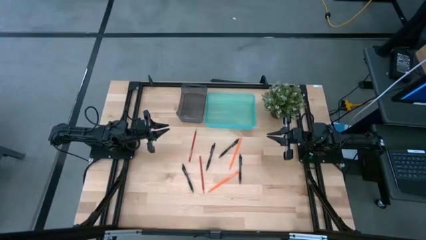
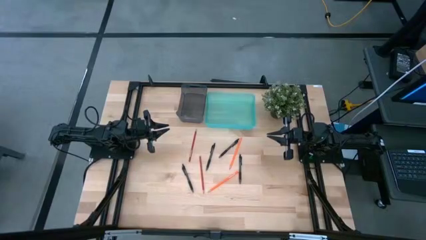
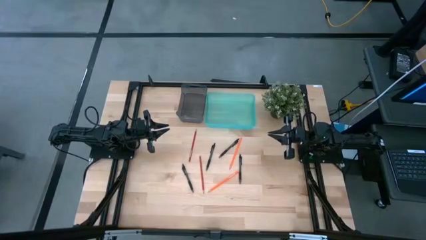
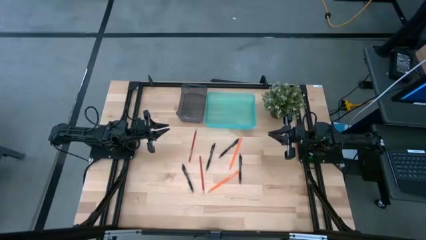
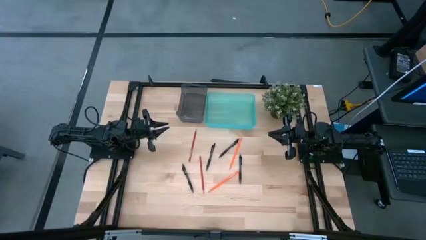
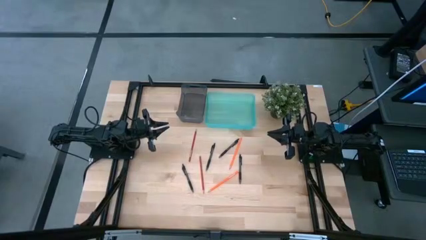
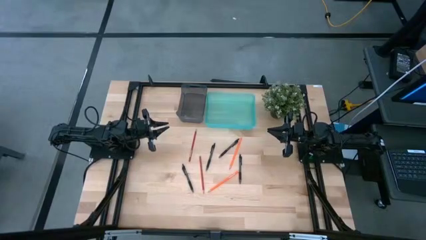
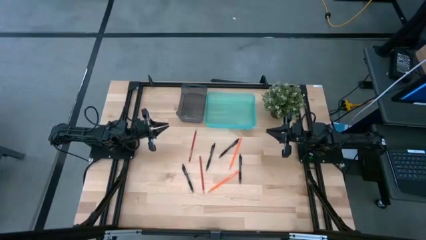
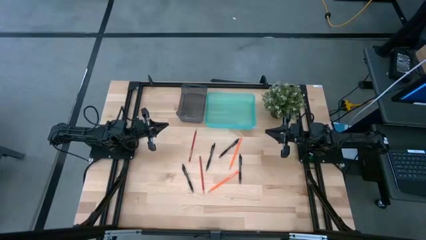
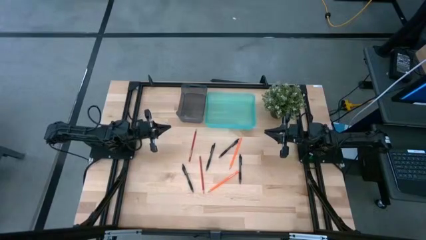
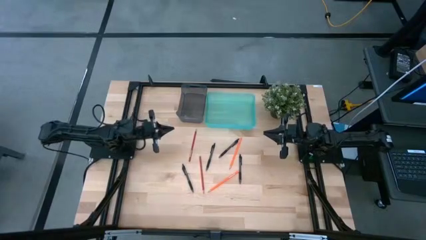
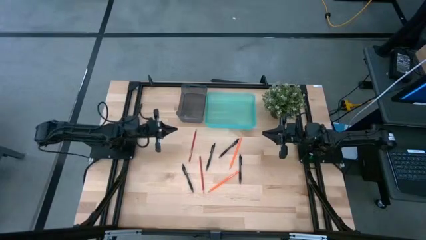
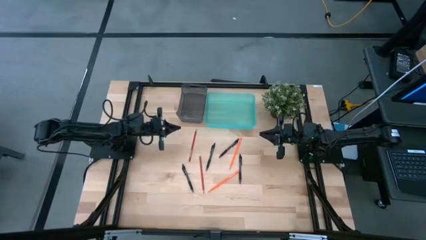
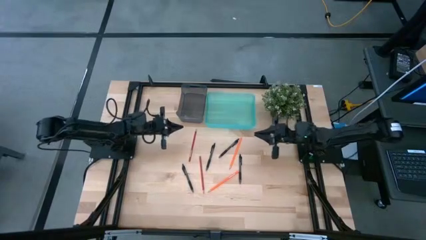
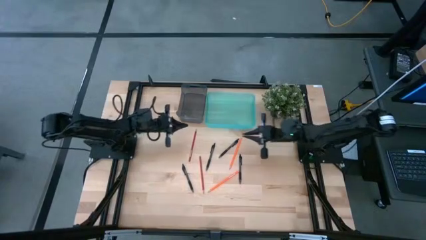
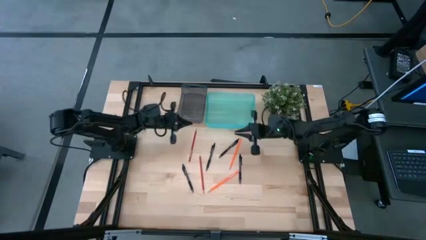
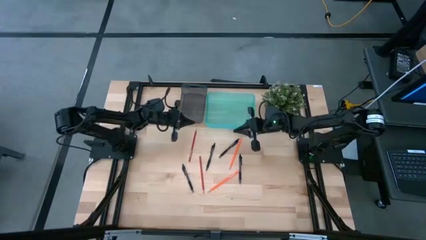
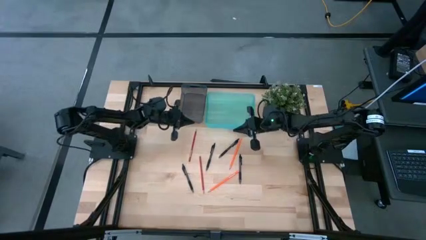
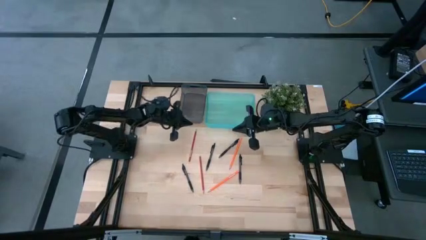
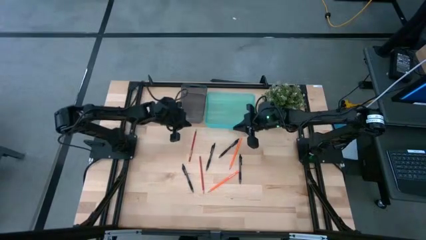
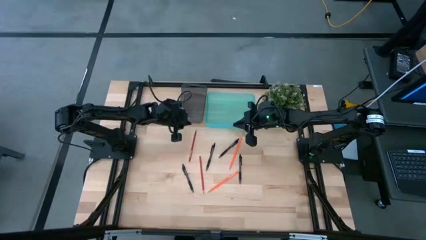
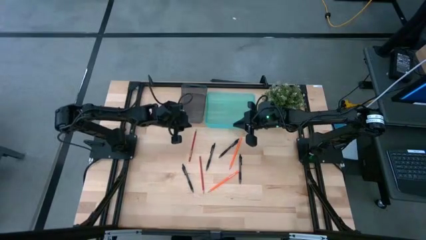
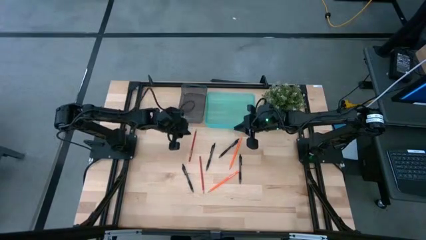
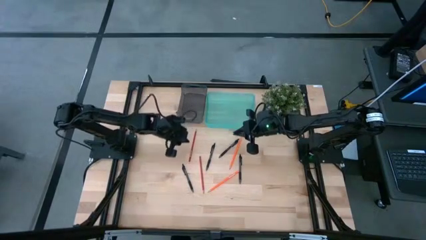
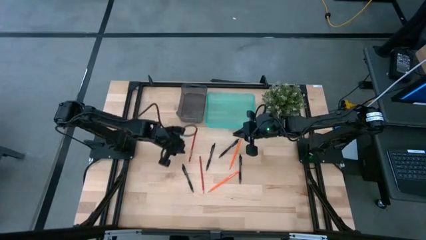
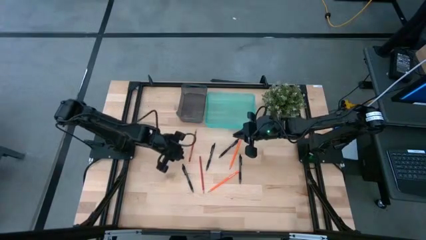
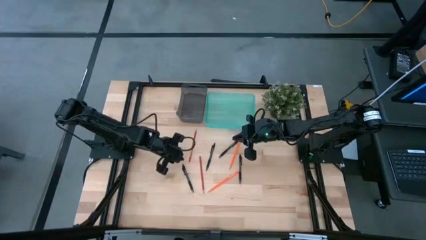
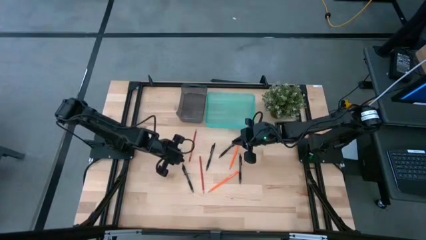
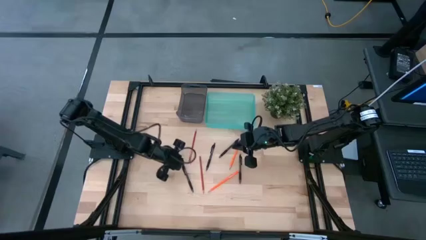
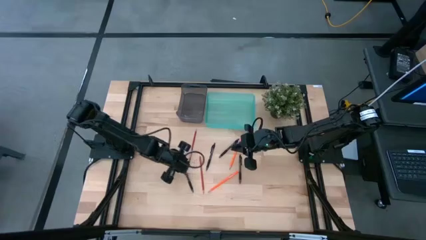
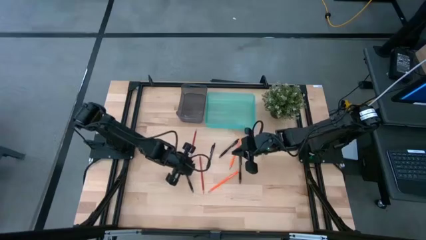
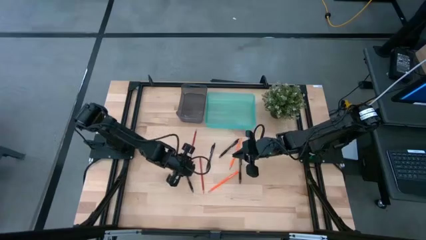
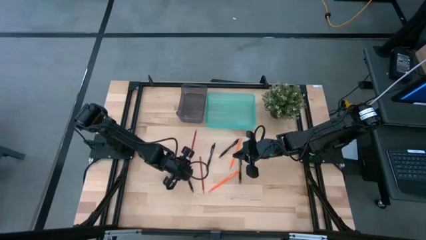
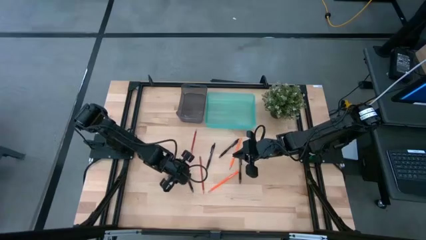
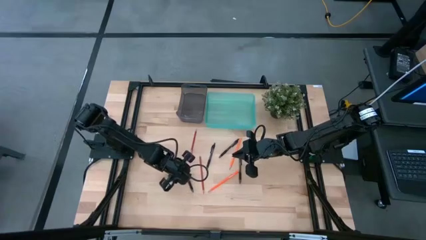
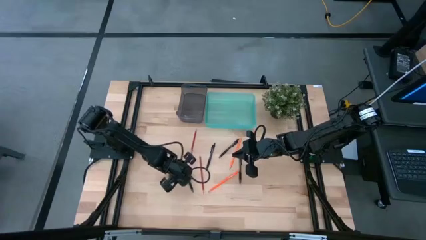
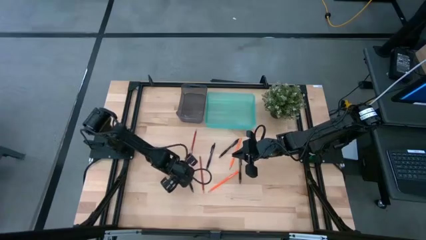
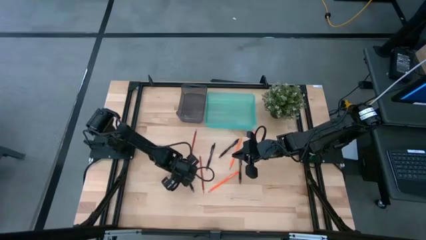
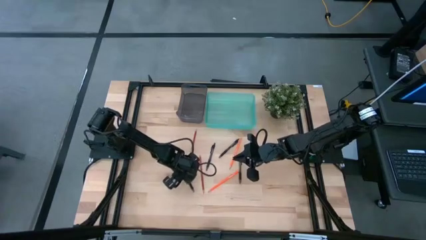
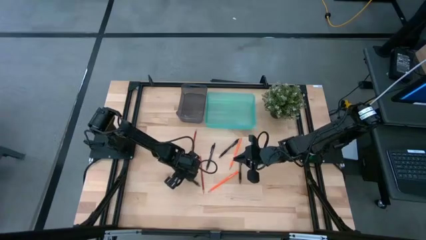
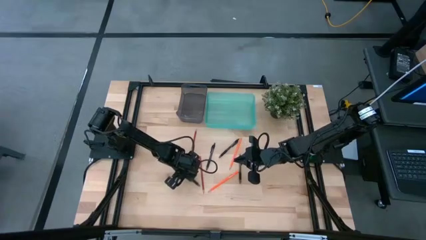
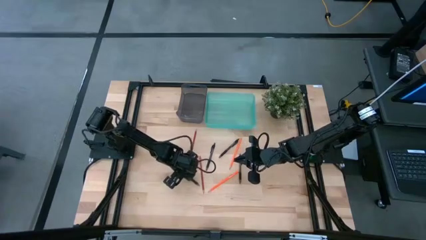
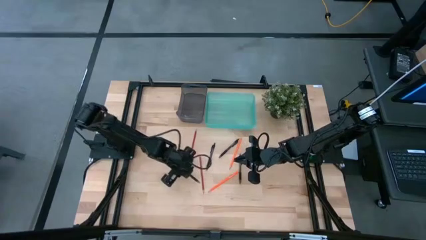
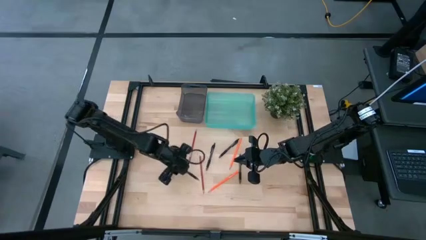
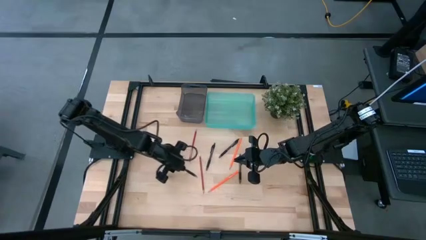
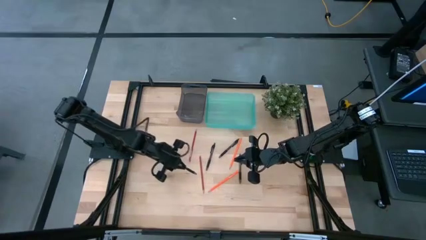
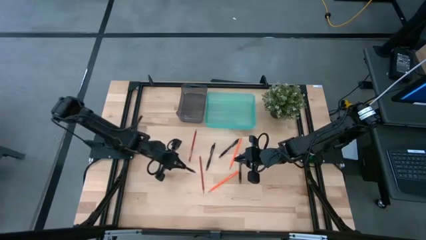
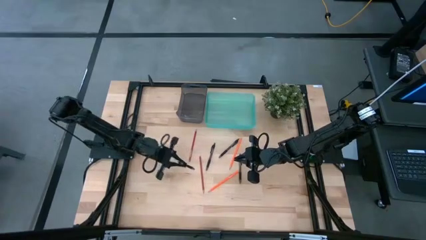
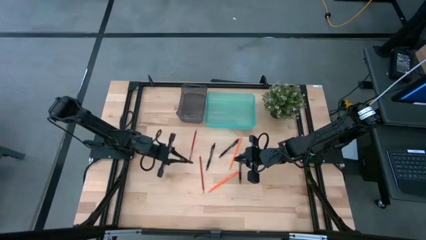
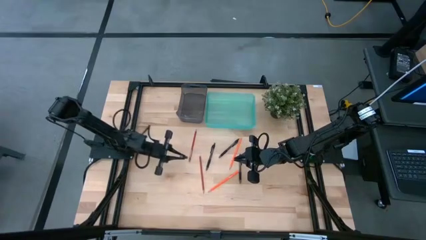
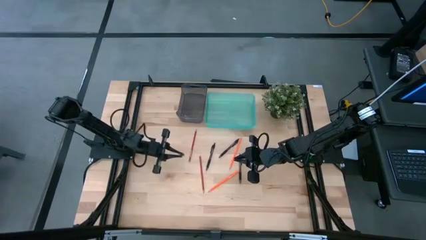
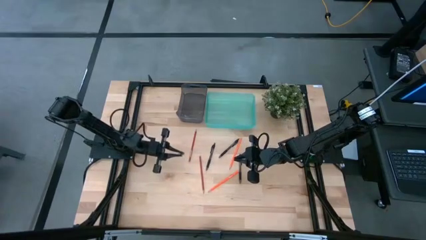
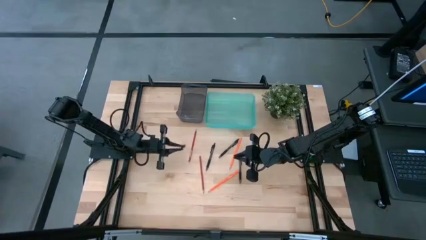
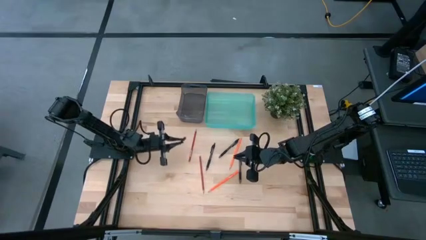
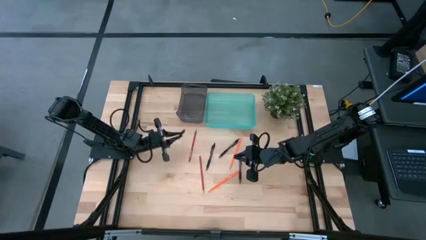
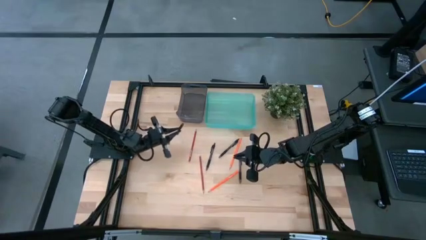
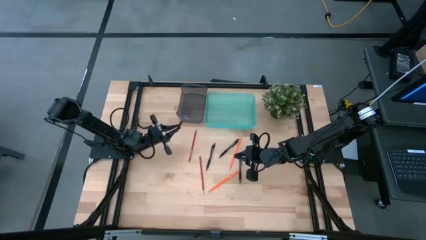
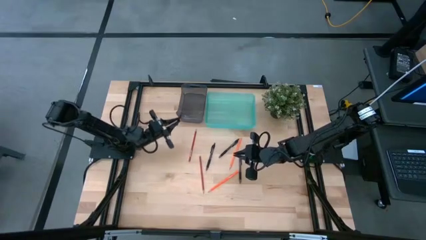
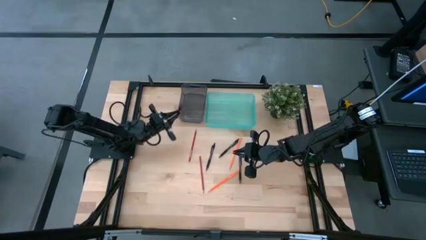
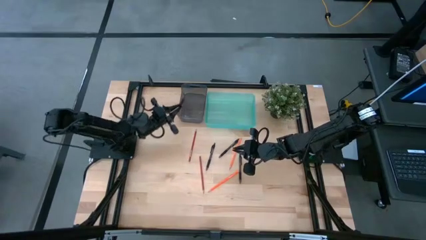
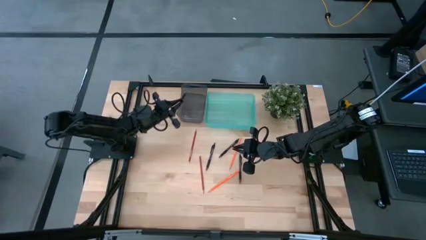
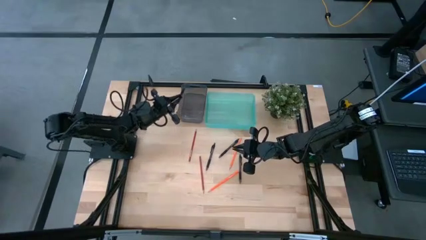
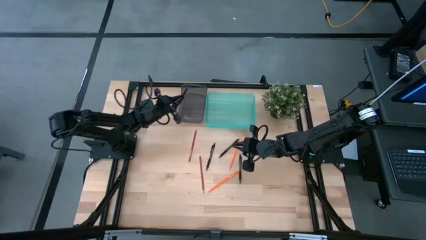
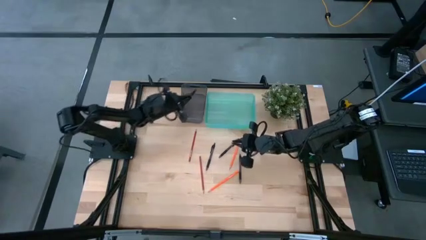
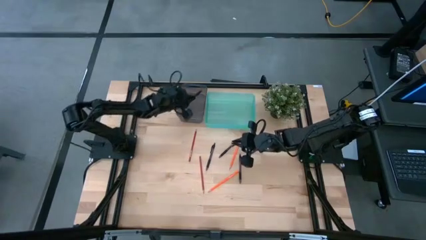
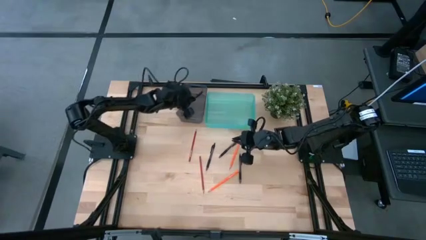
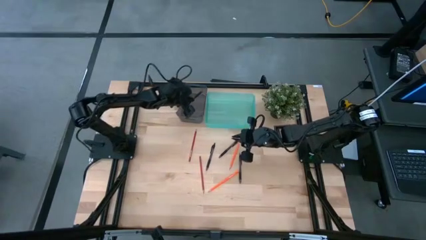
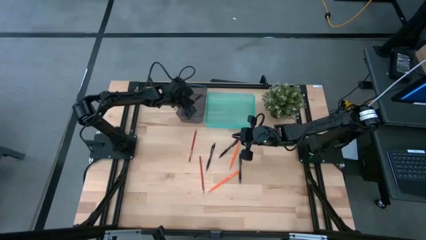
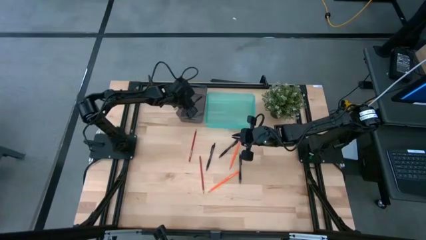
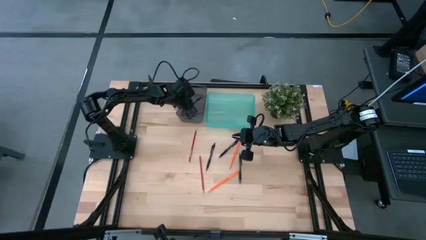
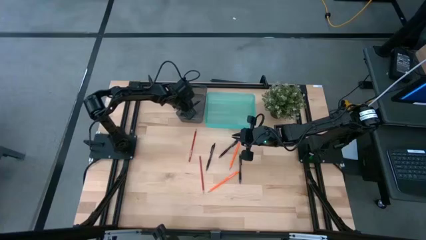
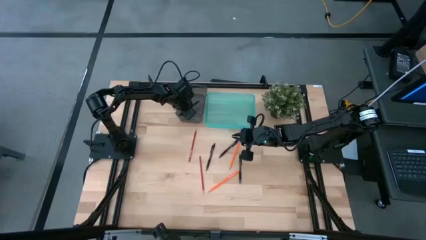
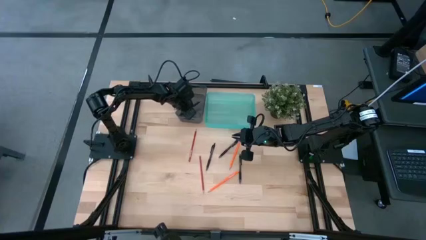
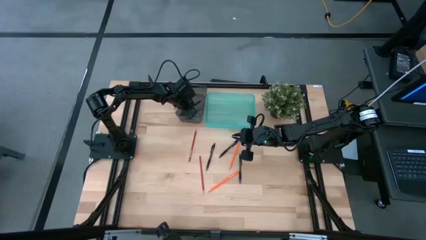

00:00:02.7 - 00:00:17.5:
Task: Sort pens & pencils
Put the black pen into the black bin
